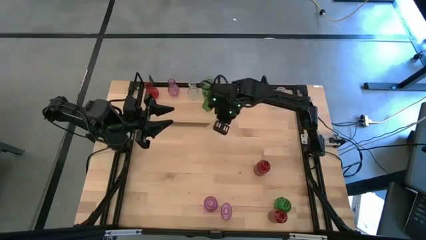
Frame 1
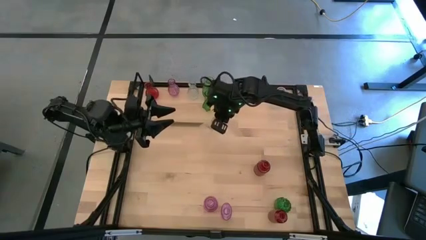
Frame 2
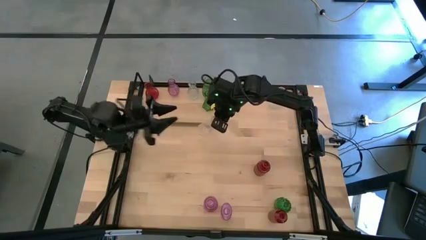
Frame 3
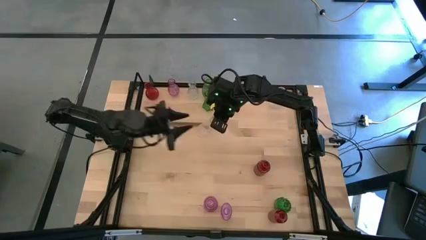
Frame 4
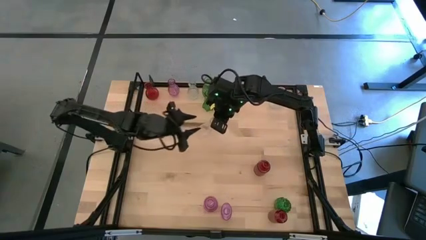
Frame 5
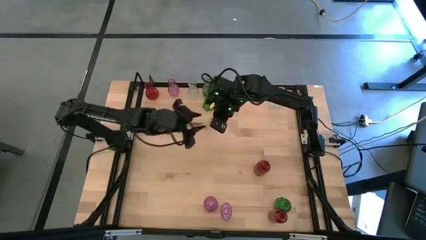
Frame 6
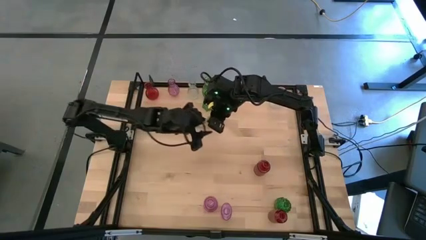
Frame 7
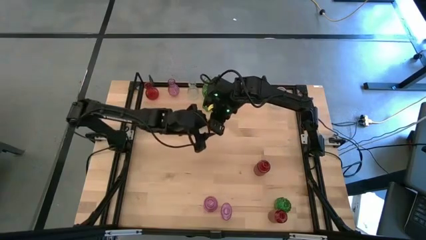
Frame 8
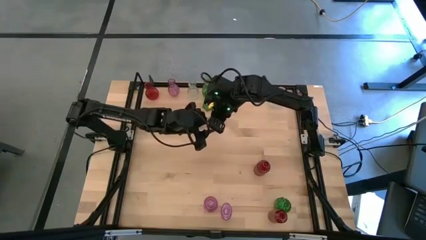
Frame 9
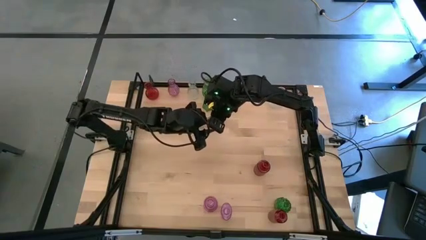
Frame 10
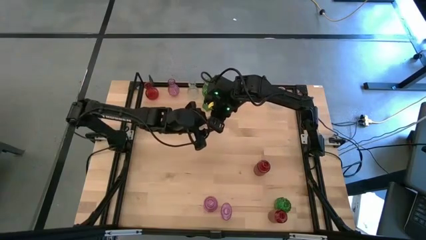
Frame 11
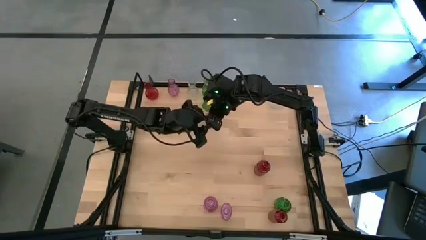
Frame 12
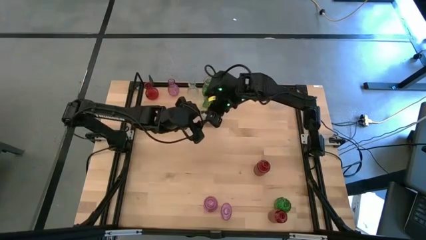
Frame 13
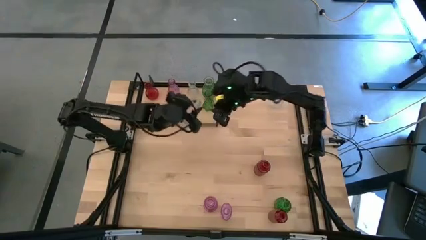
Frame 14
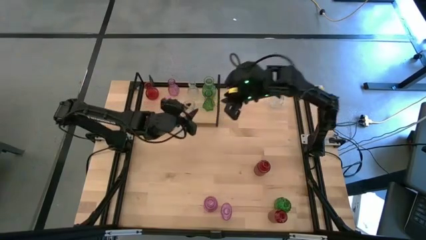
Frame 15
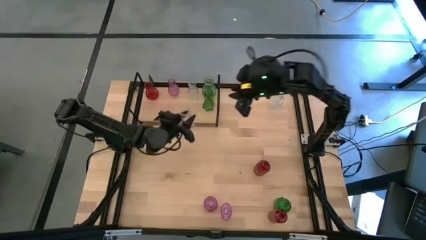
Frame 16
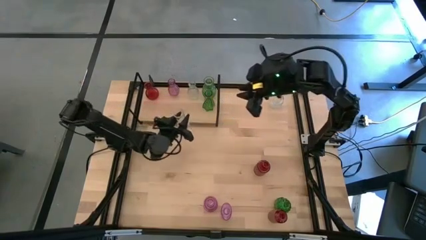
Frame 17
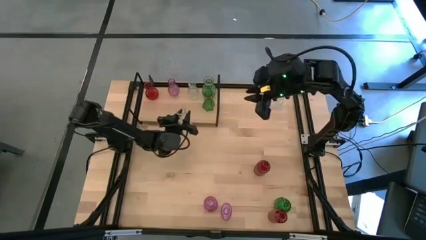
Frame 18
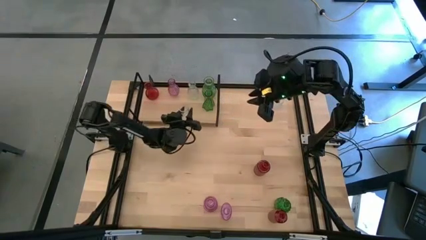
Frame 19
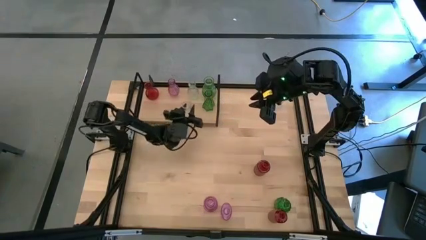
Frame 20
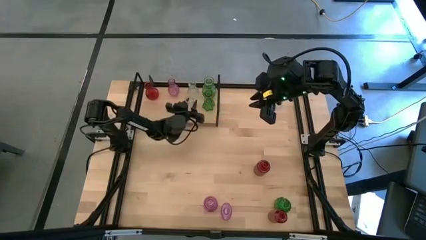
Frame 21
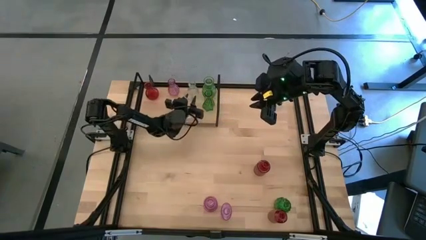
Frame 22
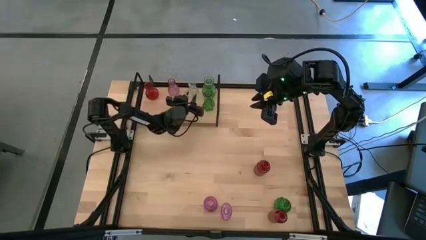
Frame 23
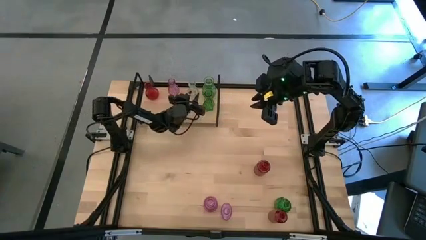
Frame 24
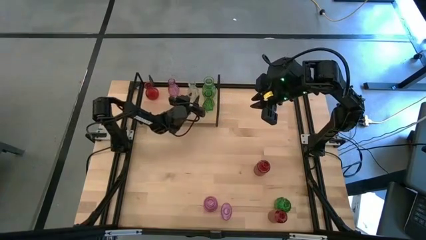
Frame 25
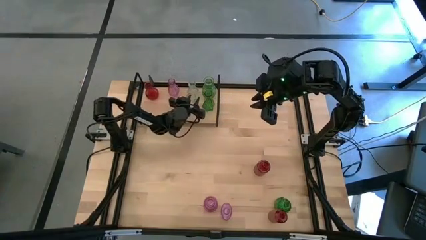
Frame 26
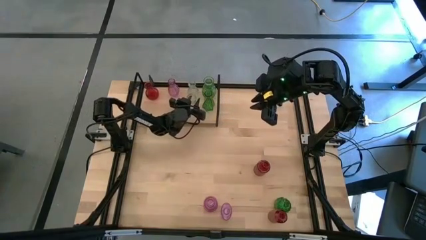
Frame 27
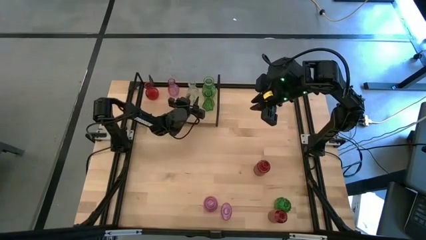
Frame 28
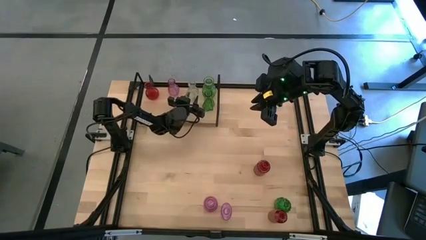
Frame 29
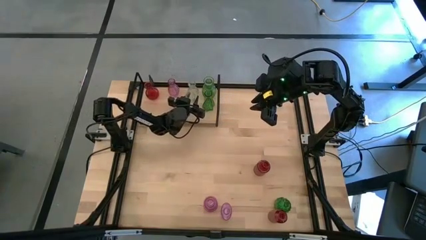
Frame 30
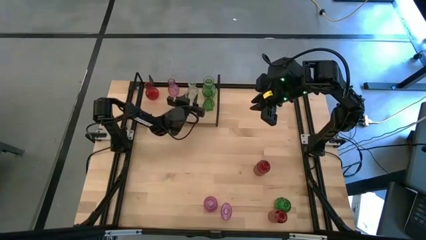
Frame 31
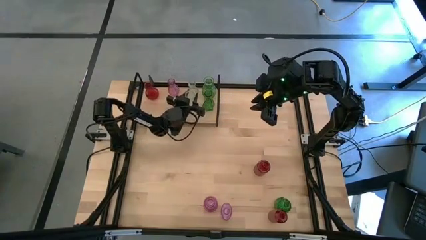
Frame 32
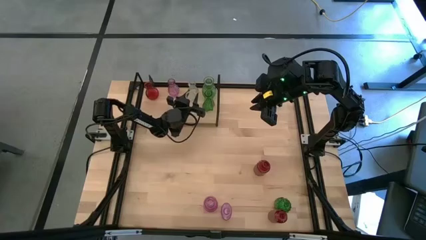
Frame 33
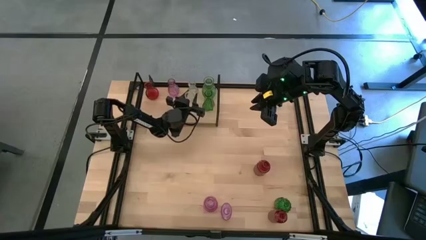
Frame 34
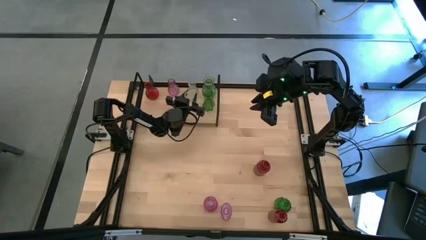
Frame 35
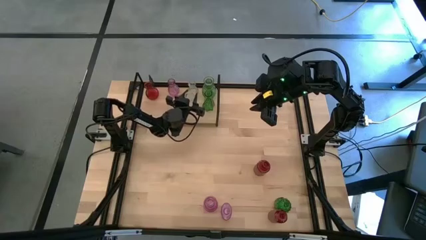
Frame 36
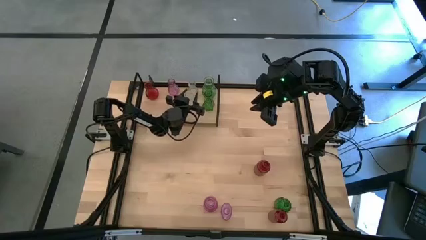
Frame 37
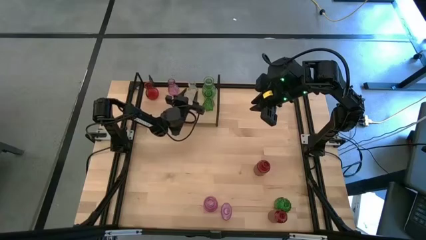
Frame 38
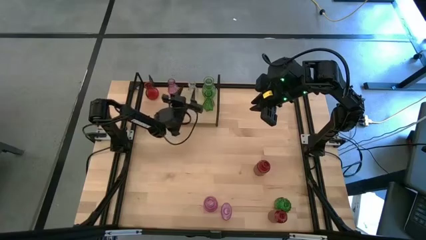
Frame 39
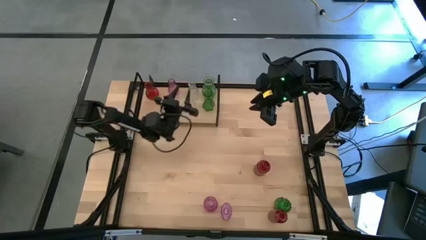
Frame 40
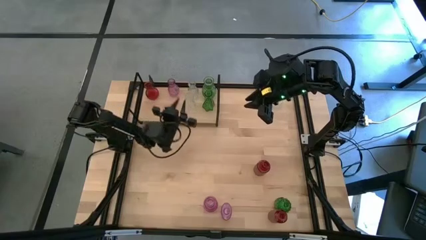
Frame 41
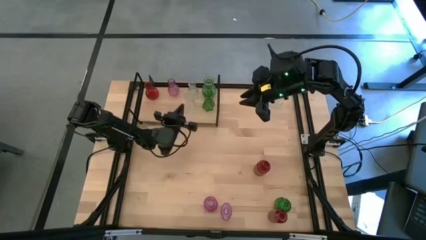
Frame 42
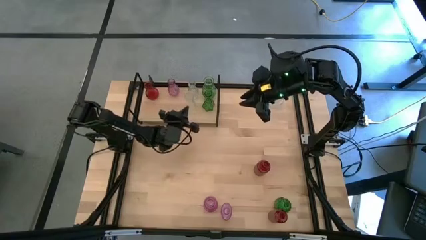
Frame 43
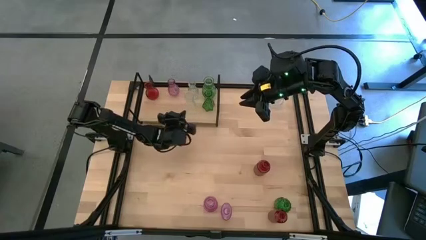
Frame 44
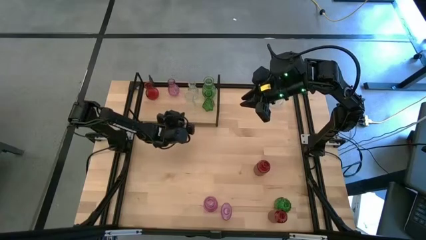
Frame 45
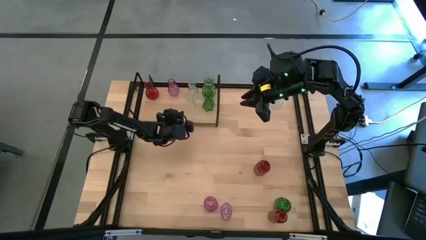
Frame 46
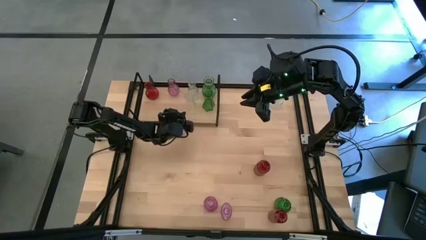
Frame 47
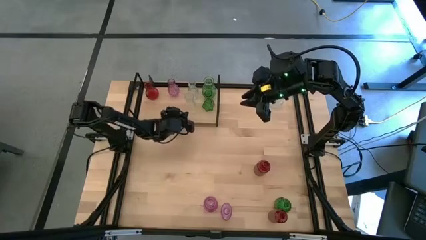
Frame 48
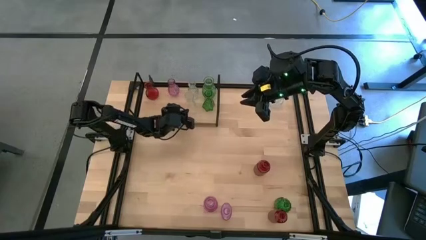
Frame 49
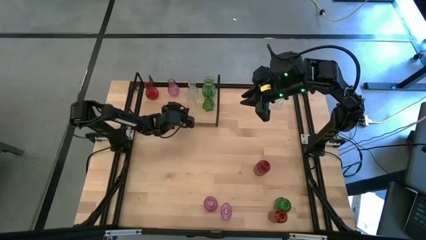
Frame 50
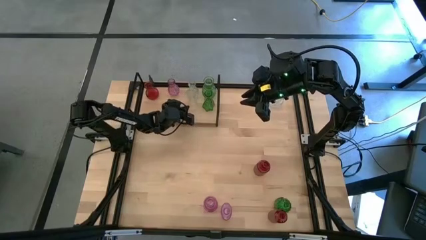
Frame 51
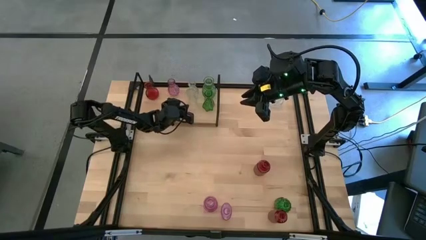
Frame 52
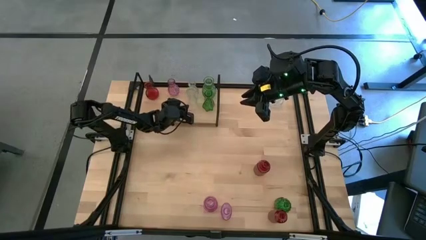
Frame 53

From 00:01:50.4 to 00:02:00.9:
Task: sort vases onto shelf
Put the bottom transparent vase on the shelf aligned with the other transparent vase

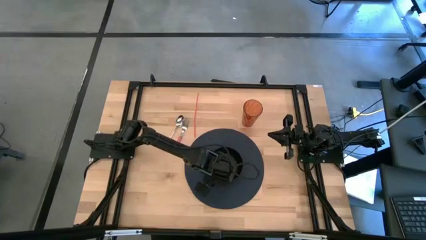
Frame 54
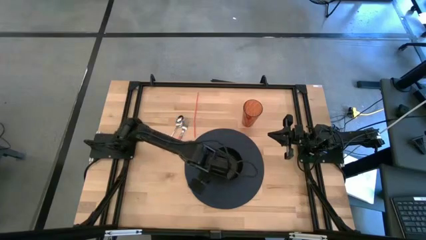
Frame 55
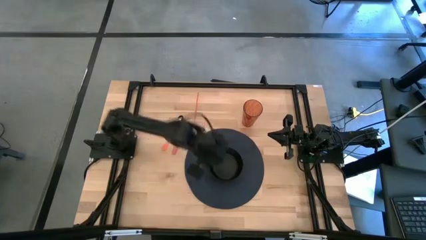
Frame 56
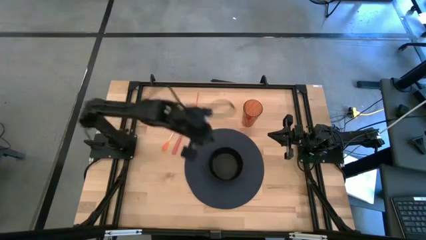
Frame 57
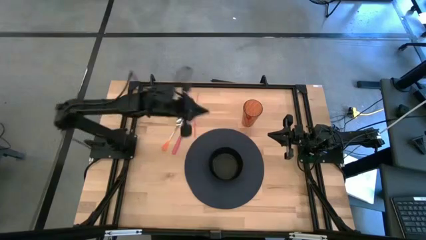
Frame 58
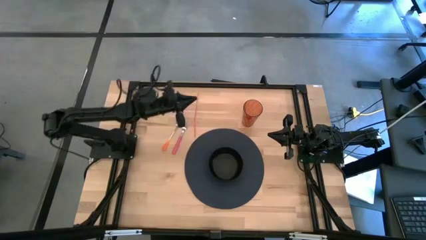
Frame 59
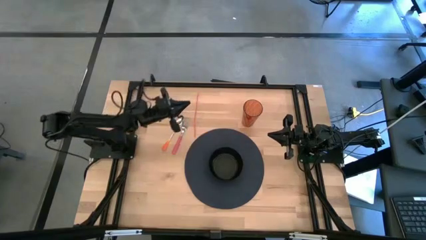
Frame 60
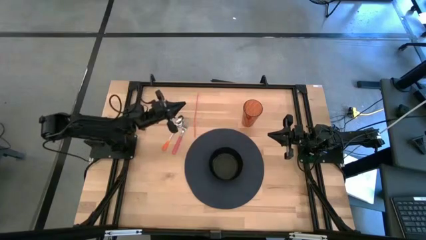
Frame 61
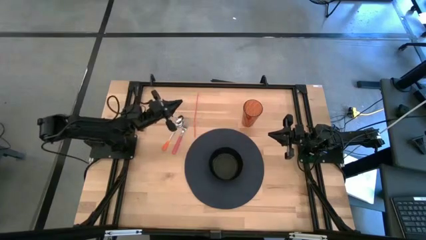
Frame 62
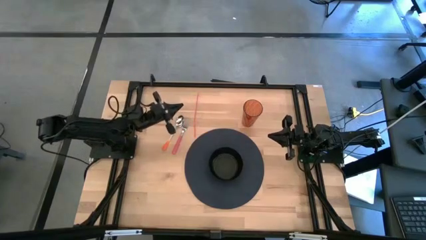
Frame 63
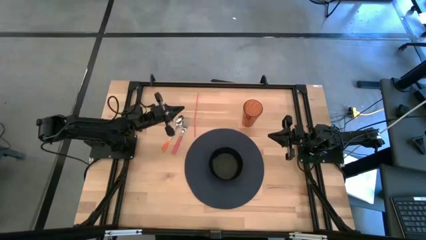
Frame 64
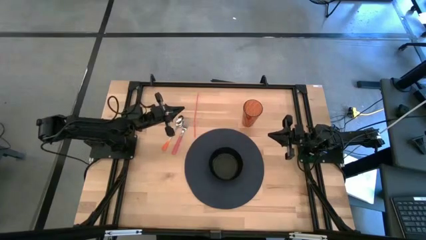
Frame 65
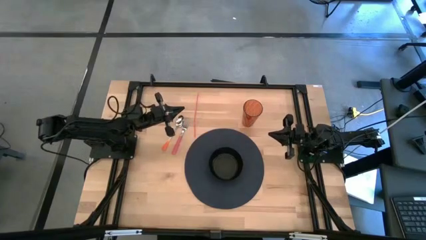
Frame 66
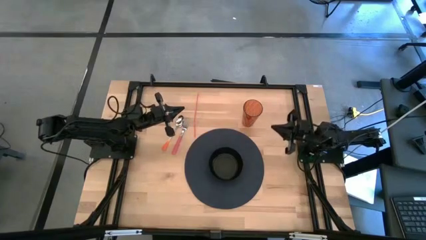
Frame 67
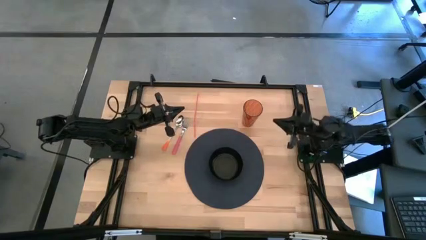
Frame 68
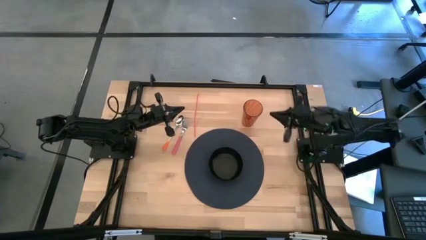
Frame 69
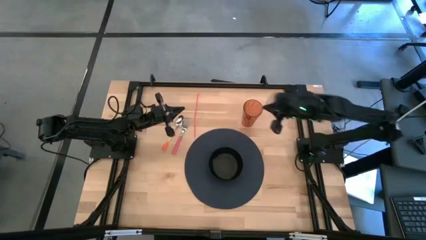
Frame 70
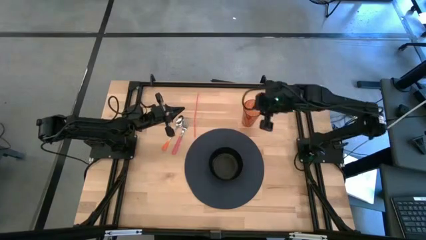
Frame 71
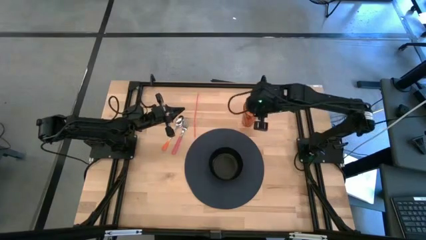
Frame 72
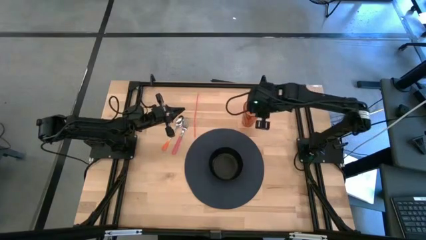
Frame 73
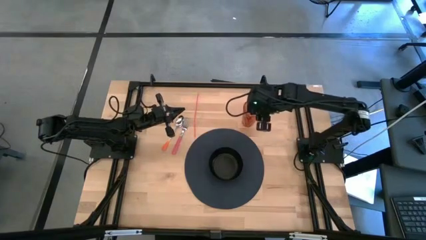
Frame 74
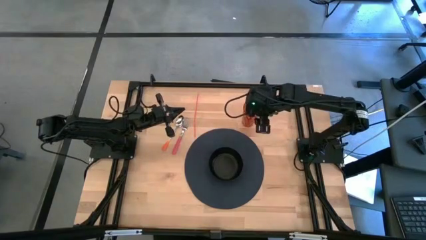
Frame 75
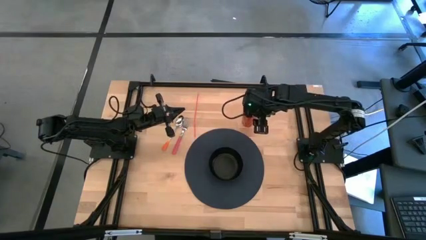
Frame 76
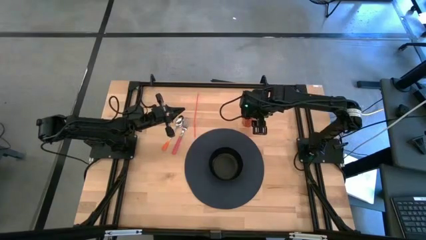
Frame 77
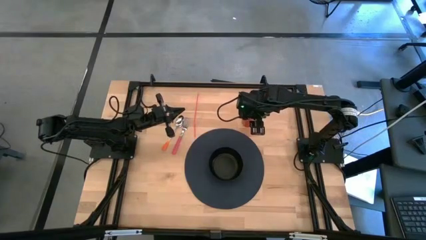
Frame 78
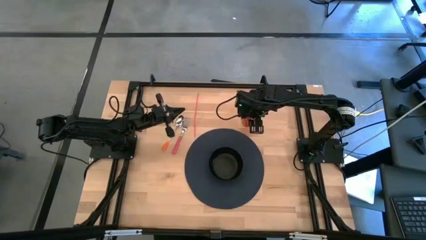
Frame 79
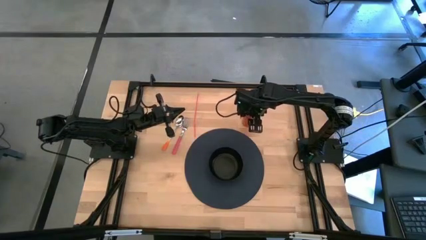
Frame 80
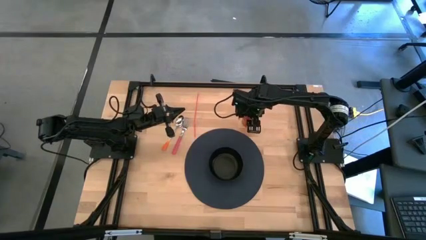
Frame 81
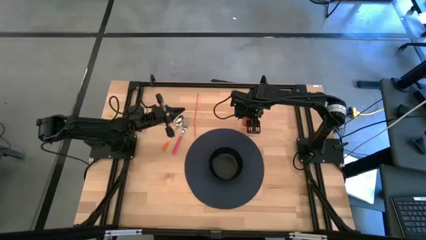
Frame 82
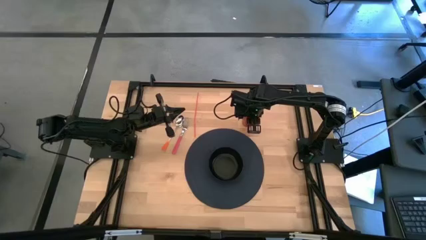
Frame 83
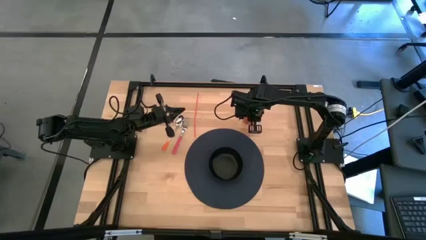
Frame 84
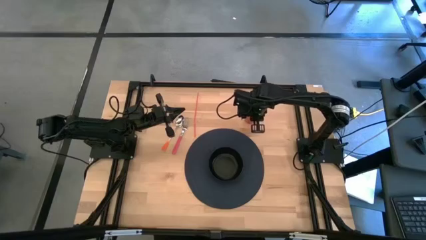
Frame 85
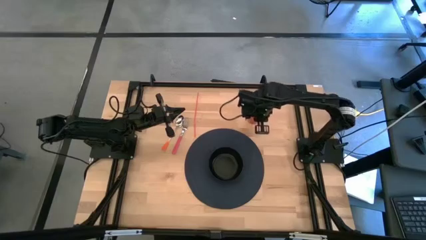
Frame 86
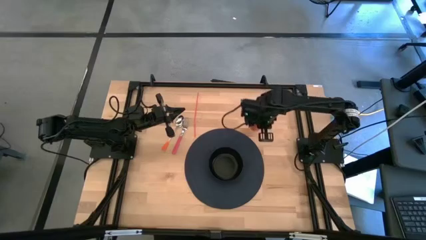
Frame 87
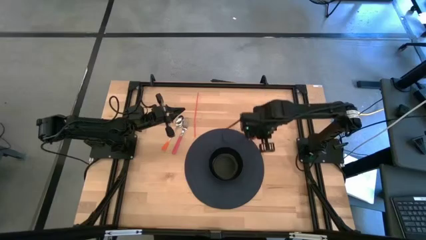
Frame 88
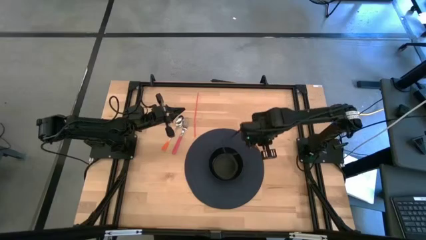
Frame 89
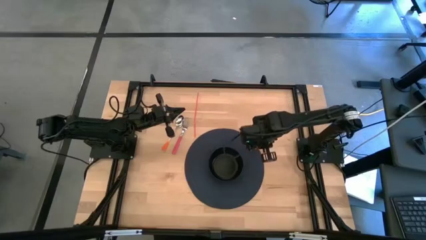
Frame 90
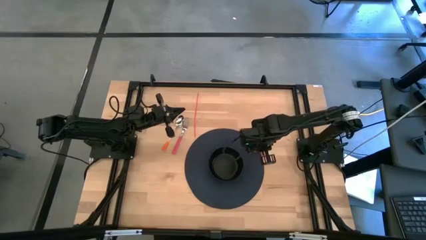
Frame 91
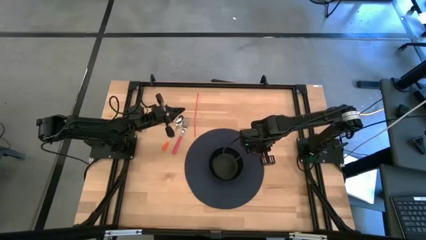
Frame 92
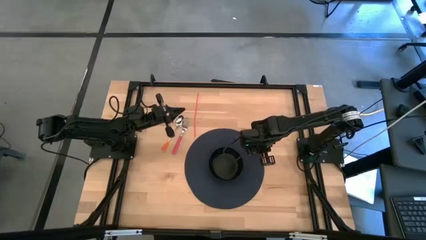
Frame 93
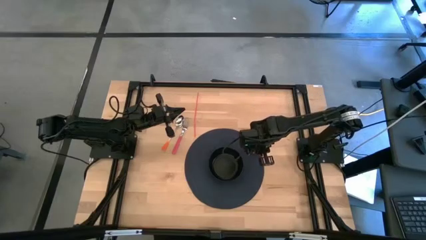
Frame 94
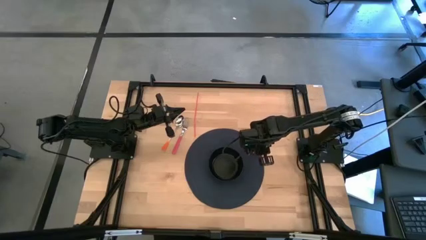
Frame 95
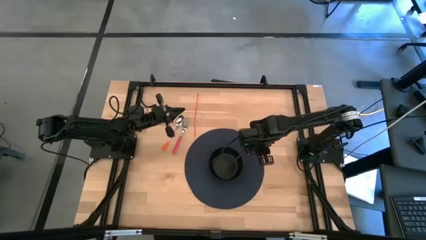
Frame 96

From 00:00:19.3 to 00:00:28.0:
Task: Pick & Place Utensil
Put the orange cup to the top right of the black bowl on the blue mat
